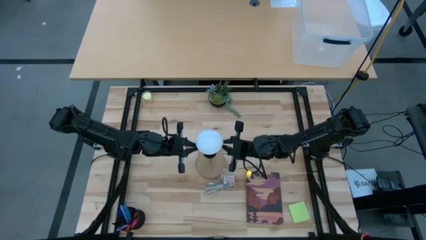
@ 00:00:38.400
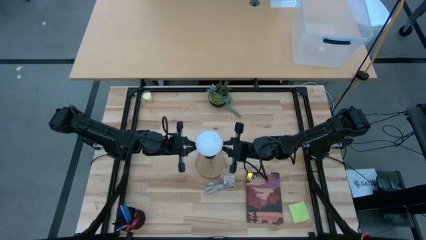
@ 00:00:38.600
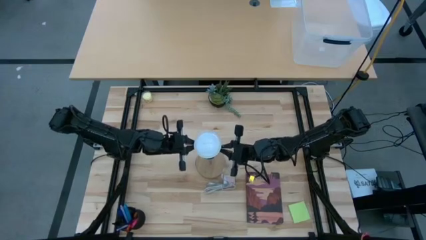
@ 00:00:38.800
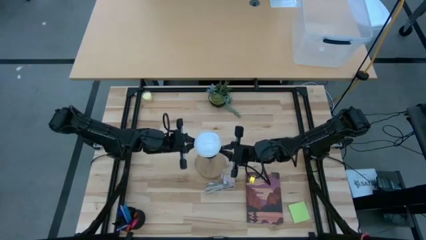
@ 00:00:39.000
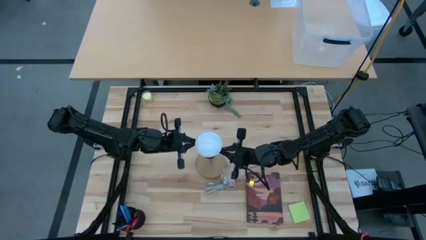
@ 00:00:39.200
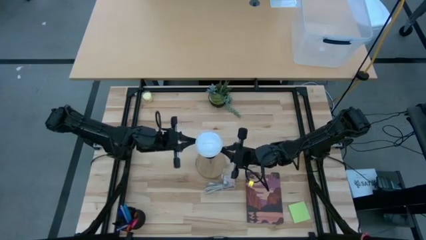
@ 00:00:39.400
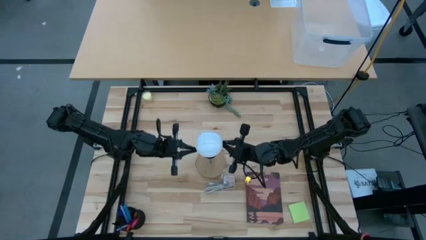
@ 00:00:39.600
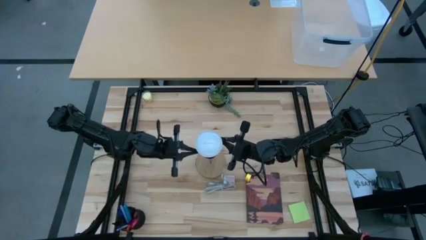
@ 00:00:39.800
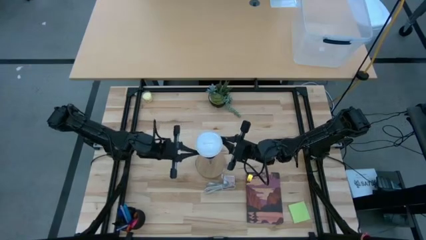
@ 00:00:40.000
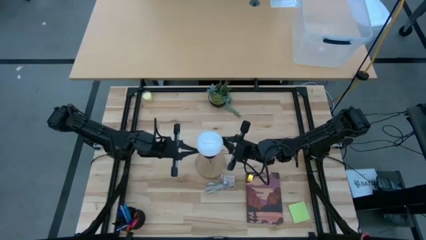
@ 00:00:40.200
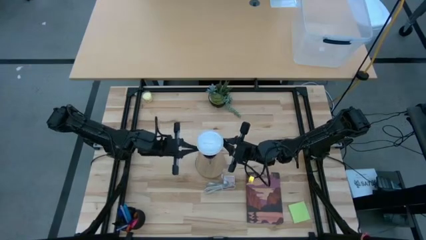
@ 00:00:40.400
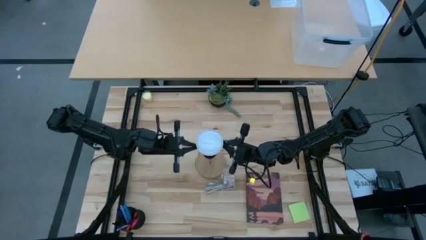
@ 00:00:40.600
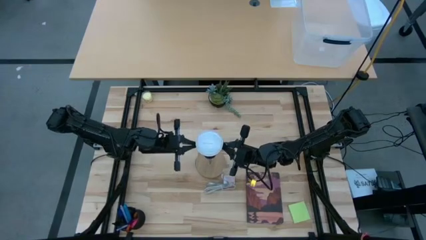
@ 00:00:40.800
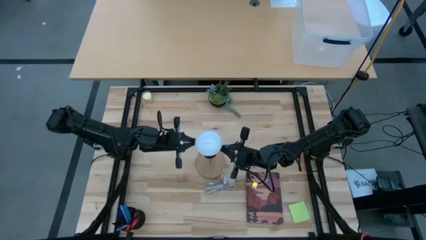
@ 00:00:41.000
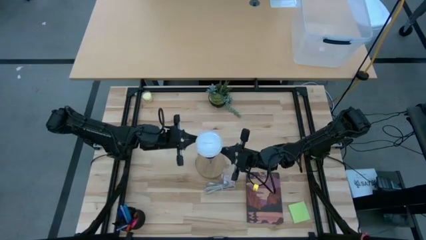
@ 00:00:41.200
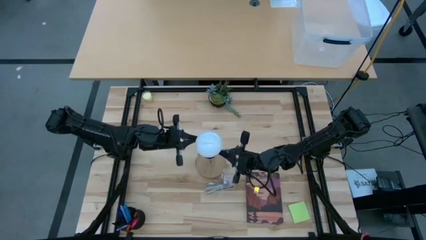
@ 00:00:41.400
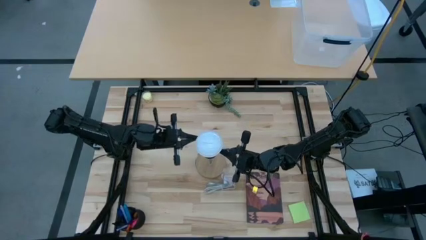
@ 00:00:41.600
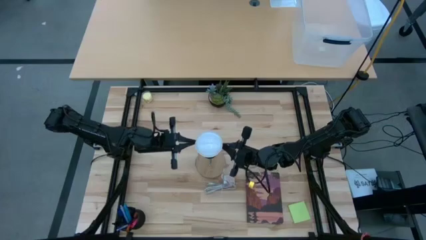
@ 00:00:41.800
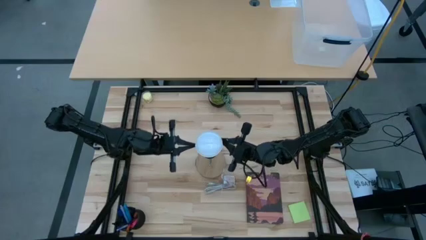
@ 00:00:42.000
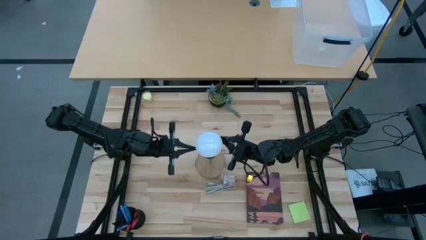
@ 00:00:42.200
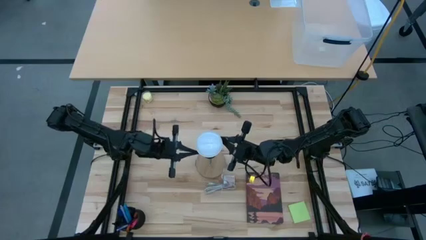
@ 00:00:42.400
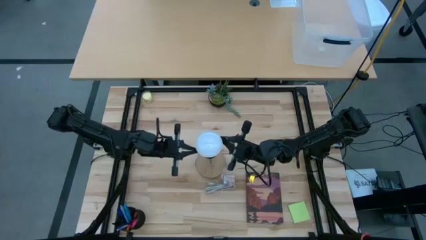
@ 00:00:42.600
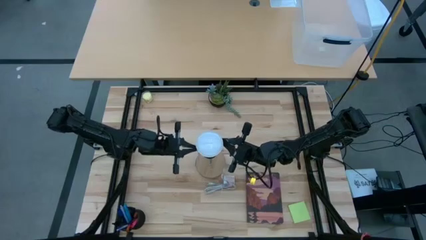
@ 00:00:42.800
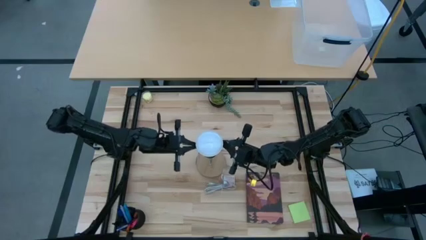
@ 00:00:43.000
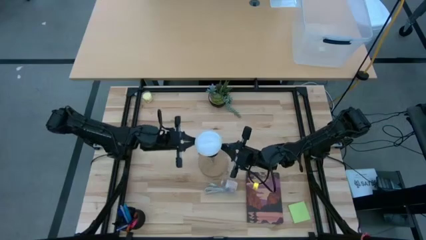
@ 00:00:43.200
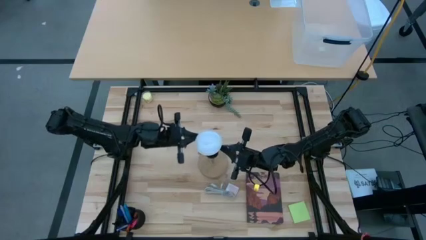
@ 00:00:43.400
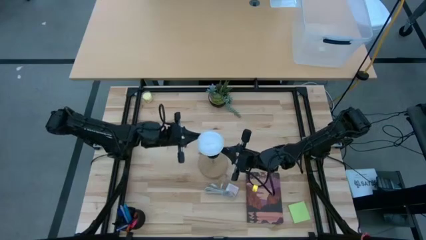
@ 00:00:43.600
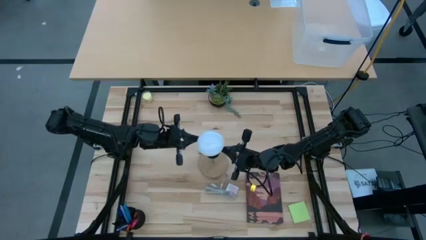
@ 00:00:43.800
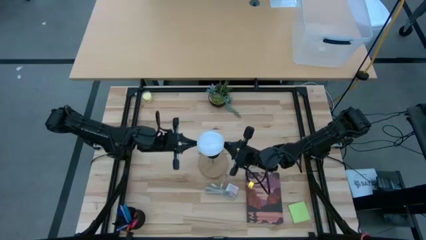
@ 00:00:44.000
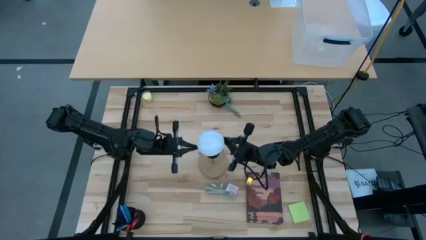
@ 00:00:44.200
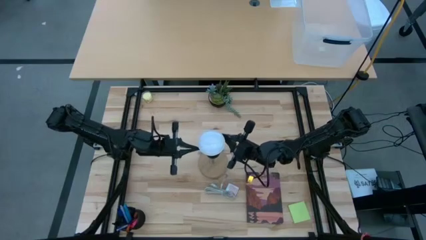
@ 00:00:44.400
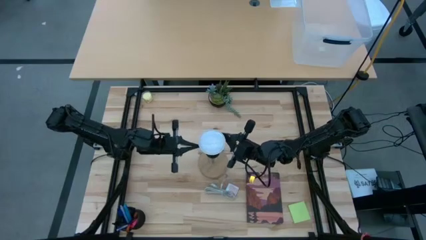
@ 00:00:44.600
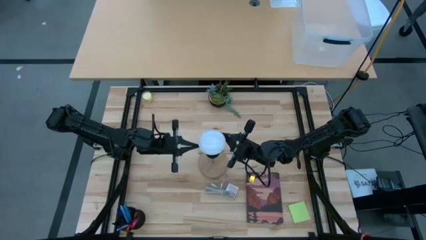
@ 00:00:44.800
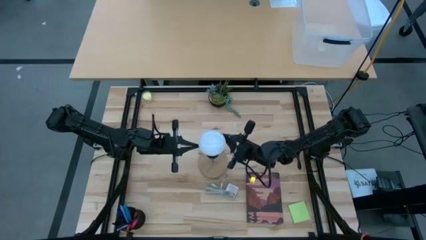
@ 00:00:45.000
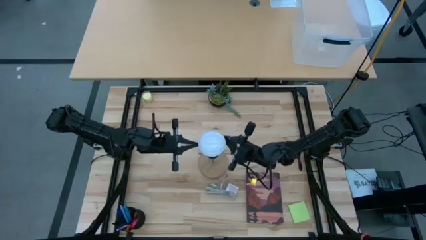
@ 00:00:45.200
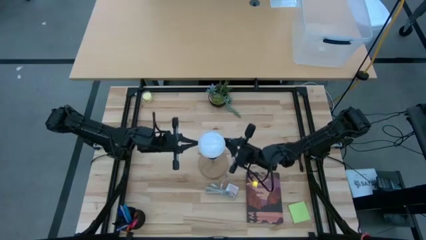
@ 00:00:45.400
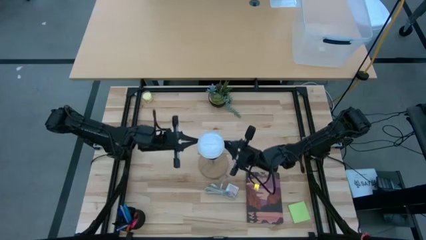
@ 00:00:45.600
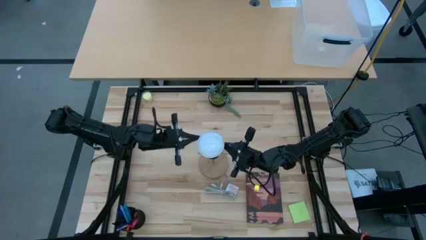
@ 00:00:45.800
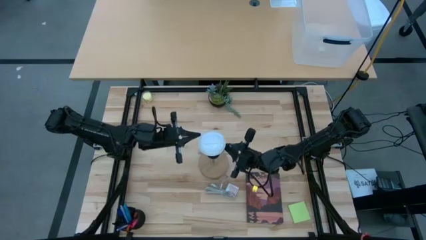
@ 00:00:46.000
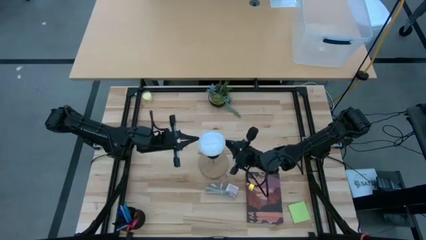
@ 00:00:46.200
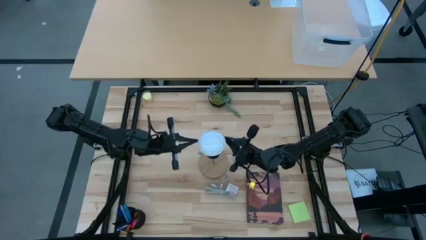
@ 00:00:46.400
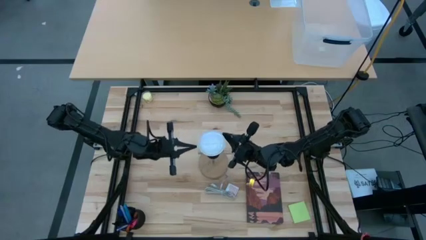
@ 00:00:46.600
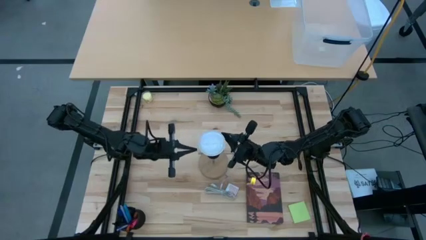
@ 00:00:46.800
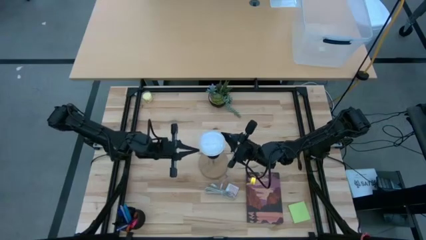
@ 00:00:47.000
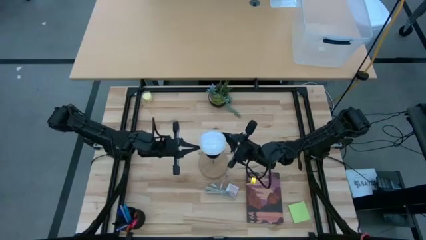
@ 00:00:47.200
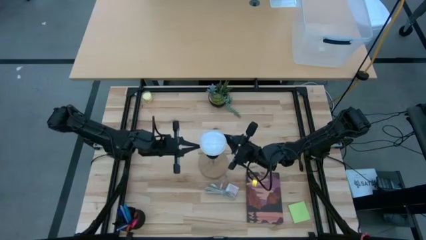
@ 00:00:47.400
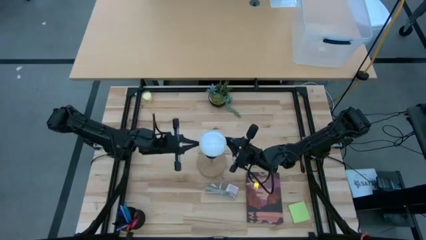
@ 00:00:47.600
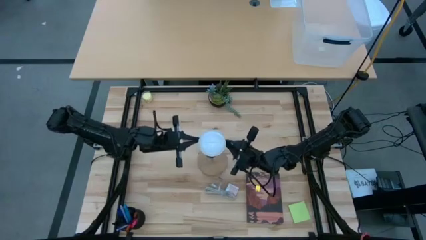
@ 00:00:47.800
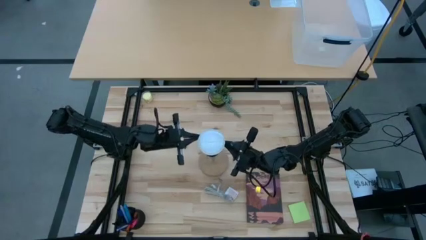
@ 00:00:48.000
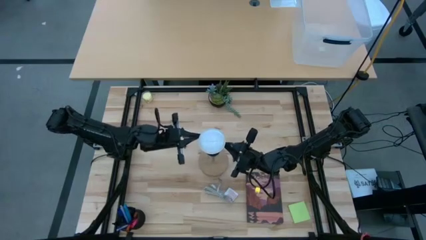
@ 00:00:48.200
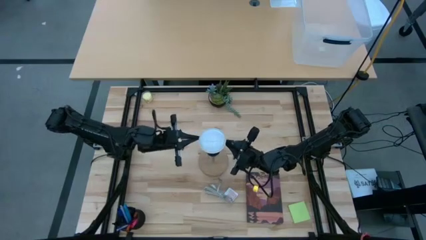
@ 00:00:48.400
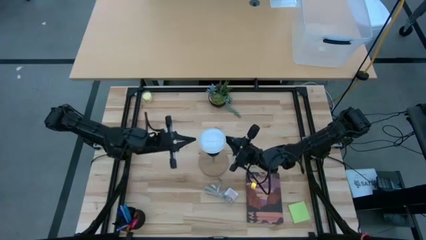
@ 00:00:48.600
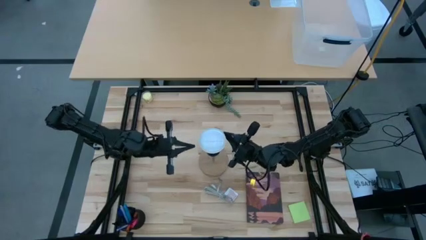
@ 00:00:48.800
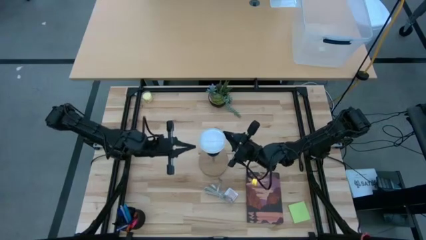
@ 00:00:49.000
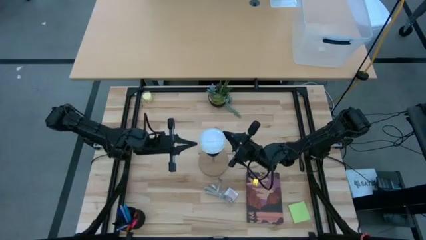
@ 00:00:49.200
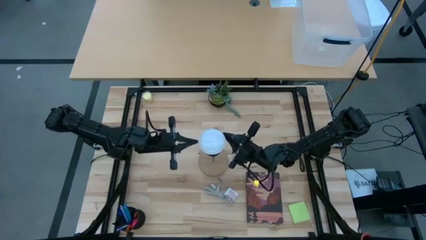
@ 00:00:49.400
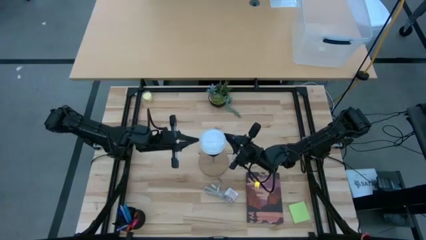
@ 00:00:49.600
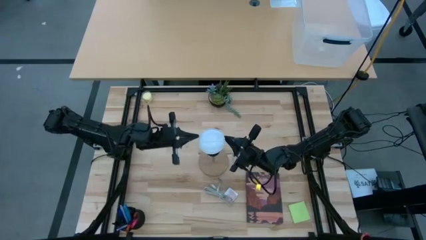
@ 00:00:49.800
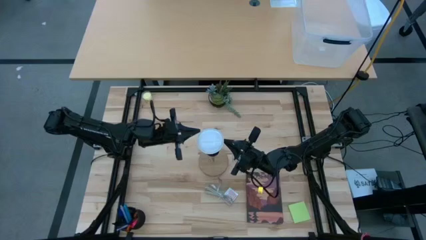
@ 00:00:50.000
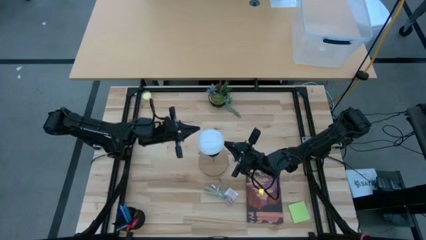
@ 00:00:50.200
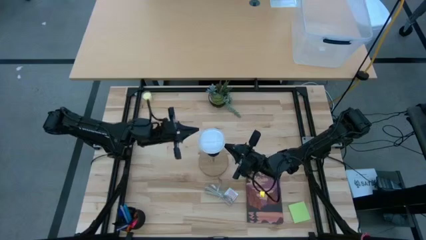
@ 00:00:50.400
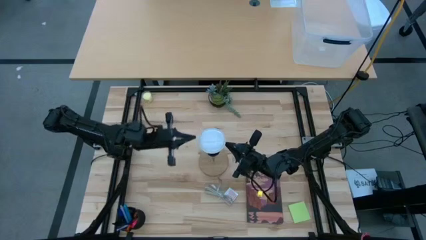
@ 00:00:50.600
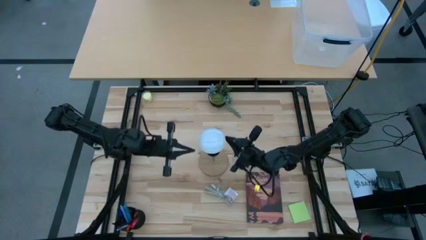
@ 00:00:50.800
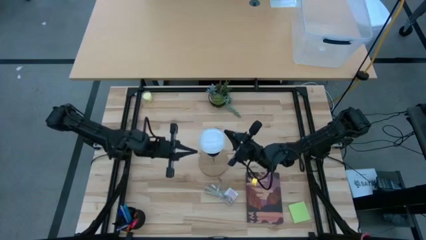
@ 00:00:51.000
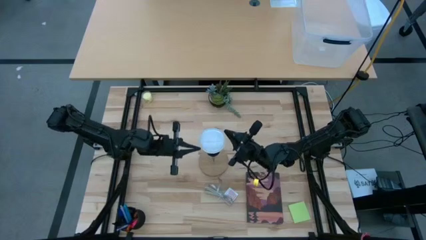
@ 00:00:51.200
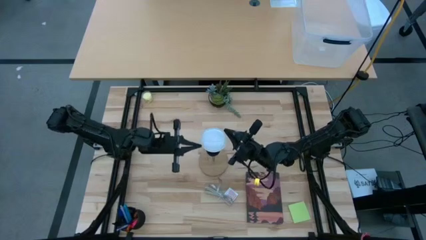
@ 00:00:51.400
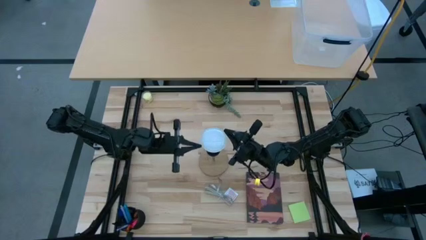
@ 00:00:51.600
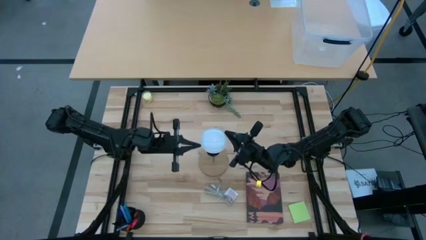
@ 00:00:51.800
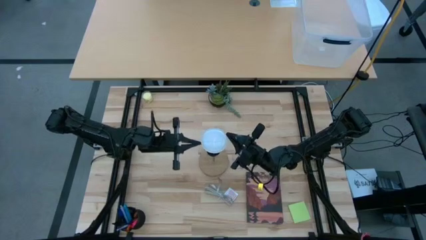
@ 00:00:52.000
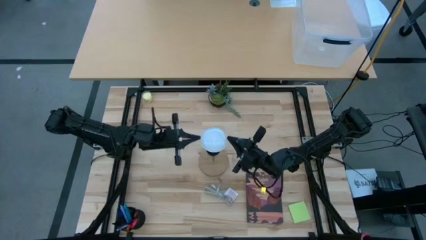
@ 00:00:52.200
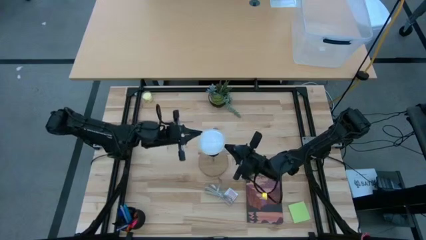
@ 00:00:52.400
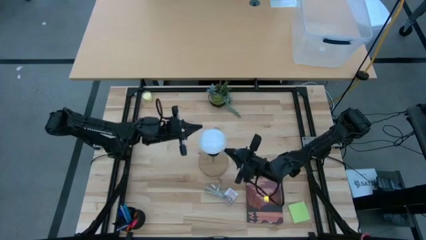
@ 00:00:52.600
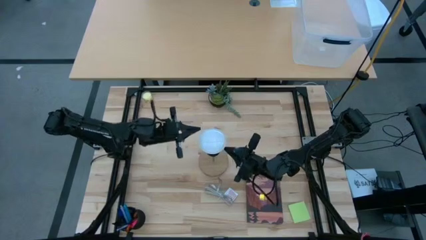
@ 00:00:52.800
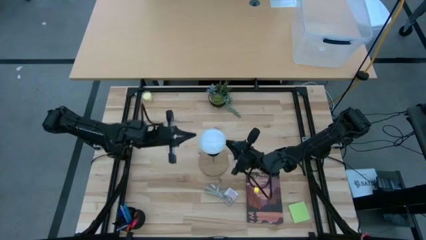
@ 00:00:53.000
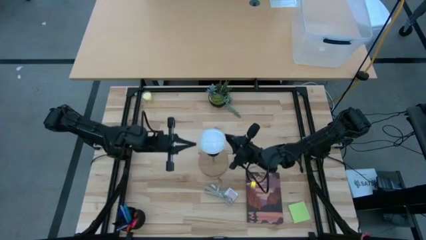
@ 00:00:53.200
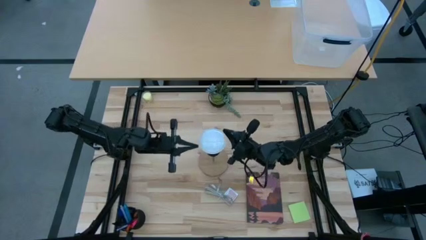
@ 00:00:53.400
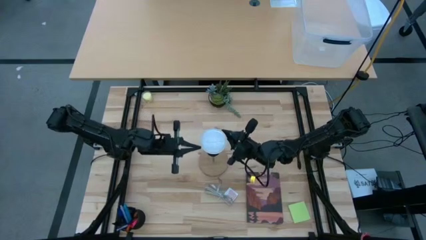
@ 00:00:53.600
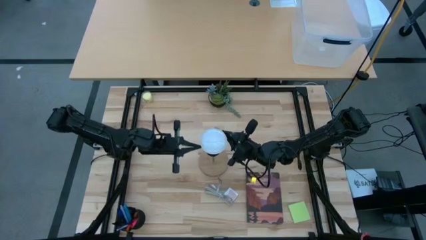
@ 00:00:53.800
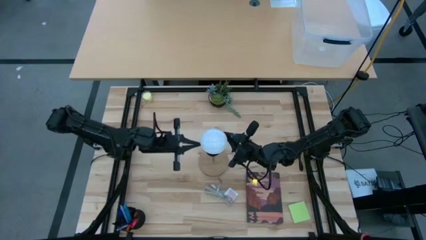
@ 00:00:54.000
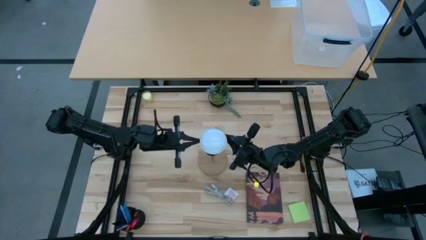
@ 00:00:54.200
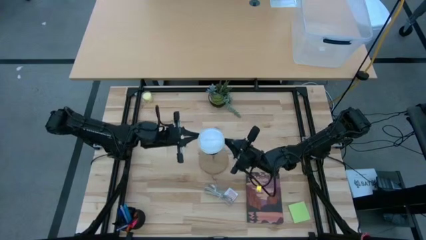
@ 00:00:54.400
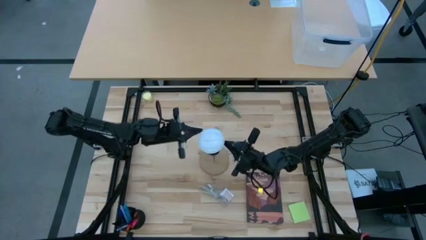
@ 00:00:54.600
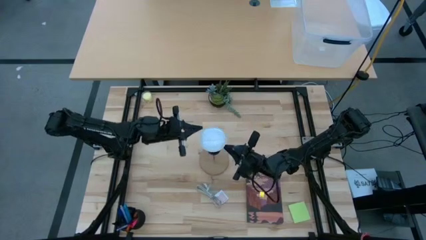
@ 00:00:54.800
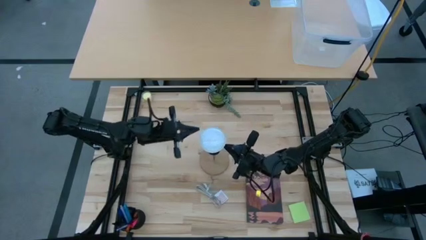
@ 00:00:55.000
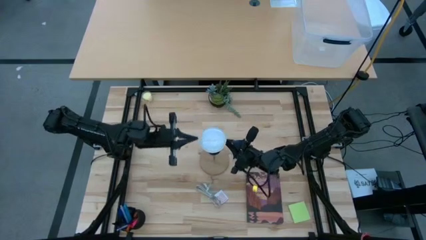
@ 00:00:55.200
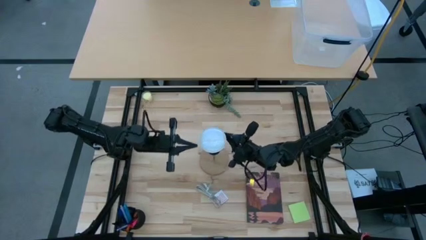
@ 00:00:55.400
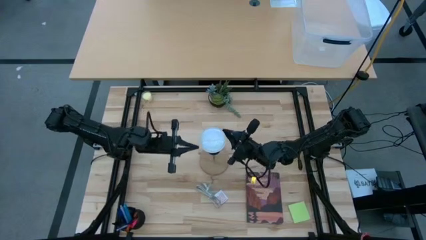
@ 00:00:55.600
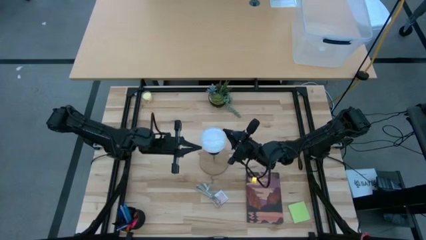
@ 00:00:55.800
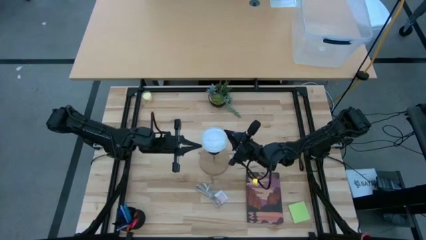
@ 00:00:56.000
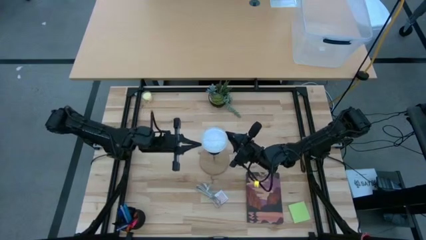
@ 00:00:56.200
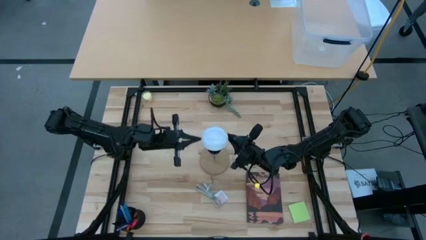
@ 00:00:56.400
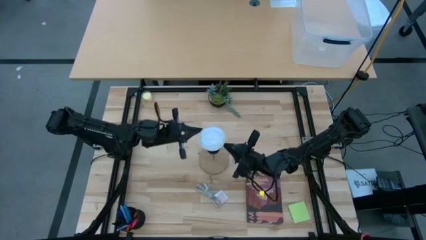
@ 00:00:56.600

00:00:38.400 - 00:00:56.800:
Task: Screw lightbulb
Insert the white lightbulb into the silver lamp
